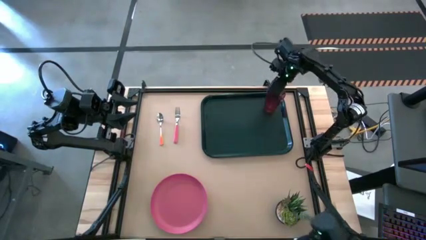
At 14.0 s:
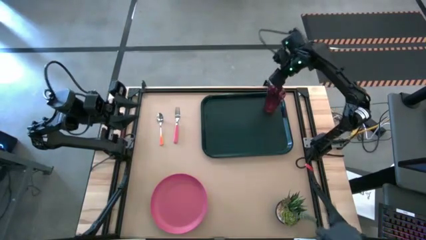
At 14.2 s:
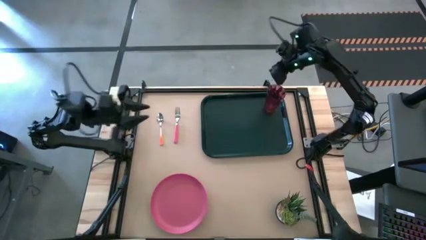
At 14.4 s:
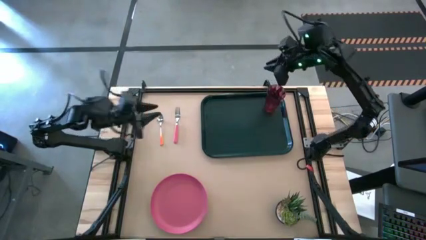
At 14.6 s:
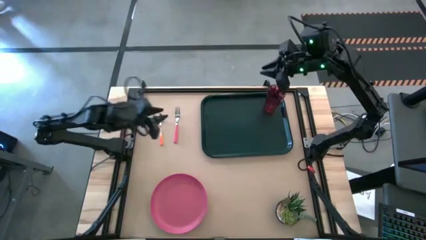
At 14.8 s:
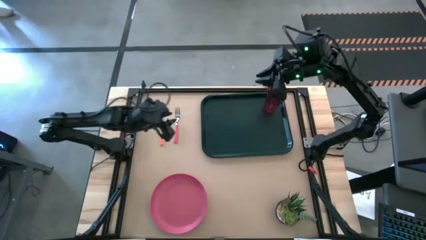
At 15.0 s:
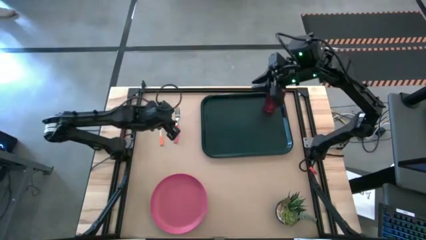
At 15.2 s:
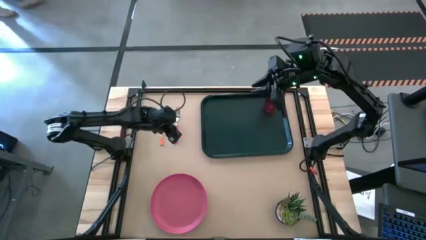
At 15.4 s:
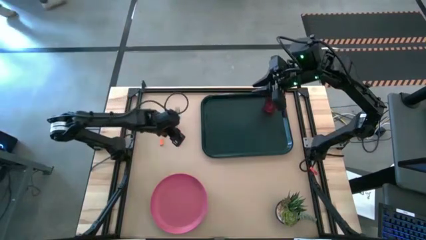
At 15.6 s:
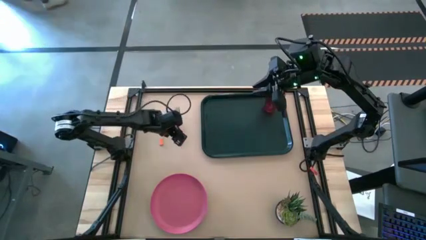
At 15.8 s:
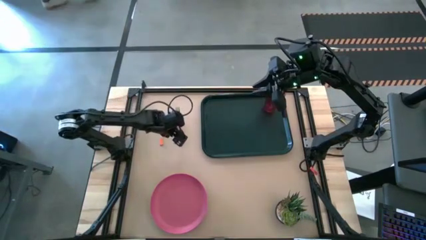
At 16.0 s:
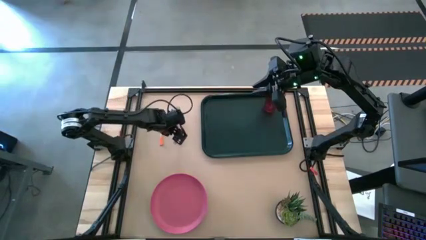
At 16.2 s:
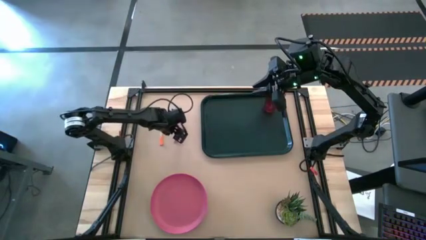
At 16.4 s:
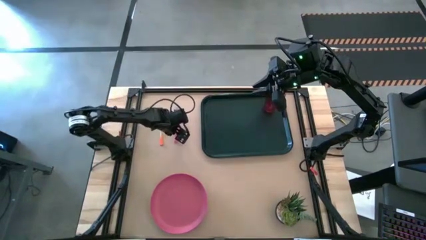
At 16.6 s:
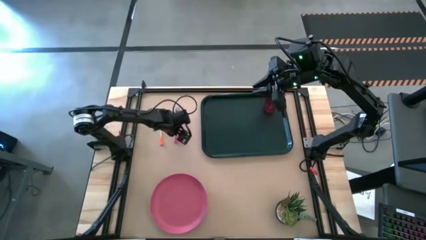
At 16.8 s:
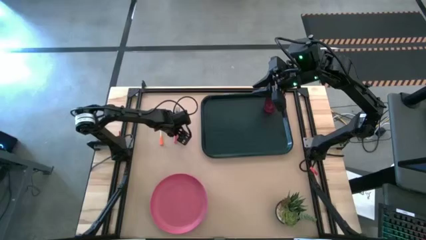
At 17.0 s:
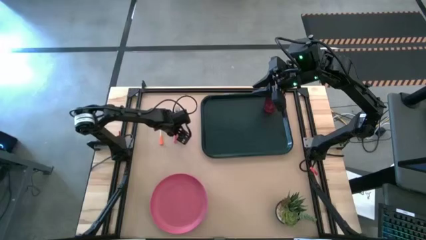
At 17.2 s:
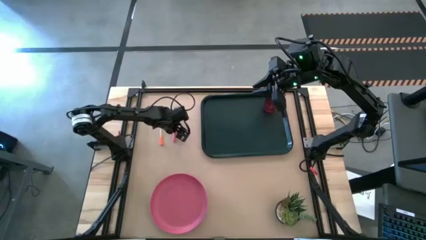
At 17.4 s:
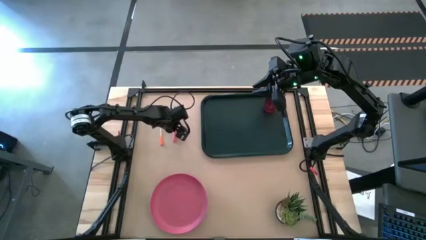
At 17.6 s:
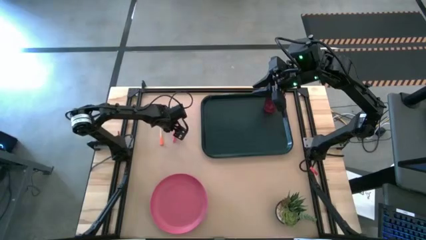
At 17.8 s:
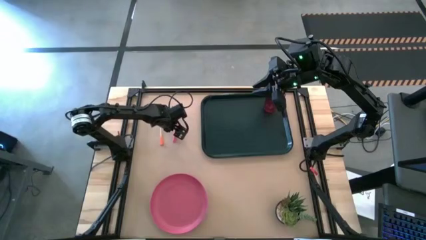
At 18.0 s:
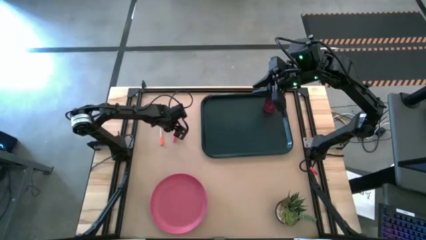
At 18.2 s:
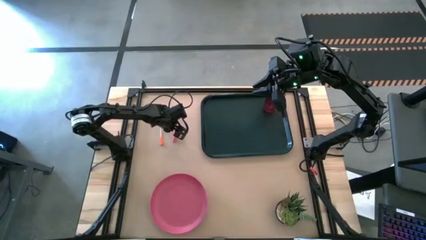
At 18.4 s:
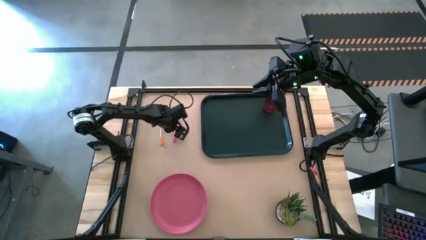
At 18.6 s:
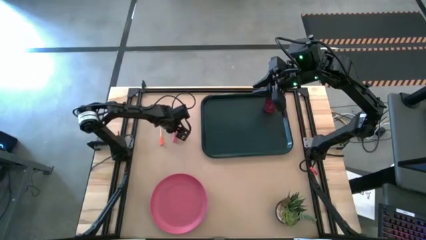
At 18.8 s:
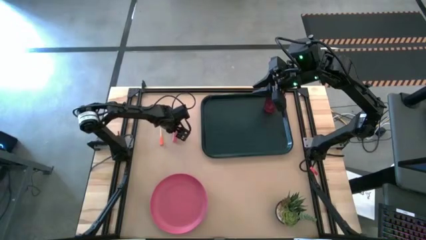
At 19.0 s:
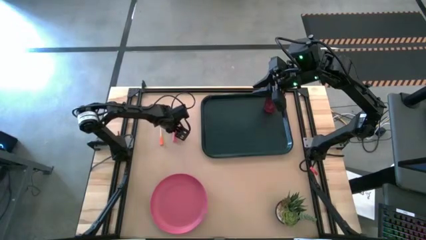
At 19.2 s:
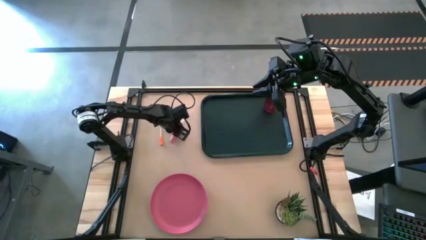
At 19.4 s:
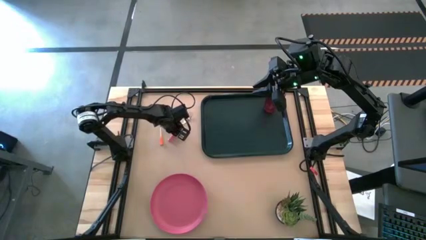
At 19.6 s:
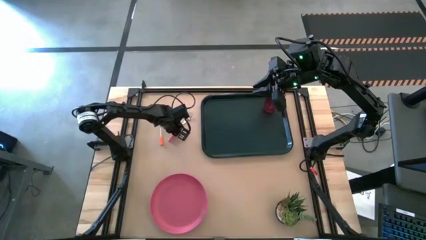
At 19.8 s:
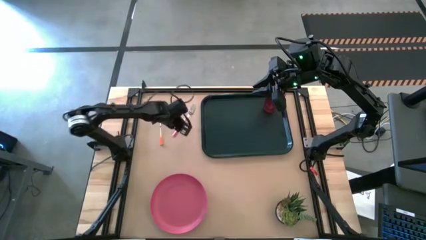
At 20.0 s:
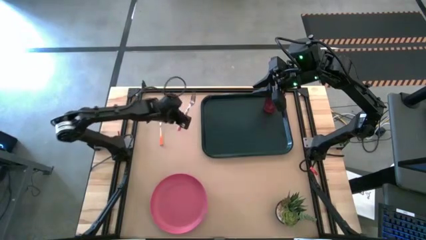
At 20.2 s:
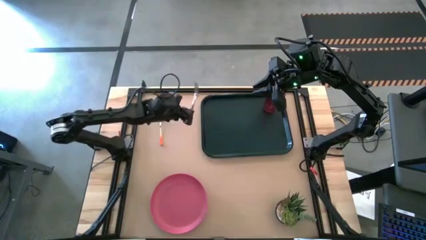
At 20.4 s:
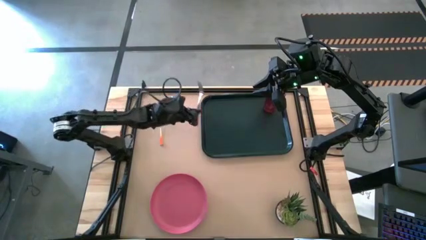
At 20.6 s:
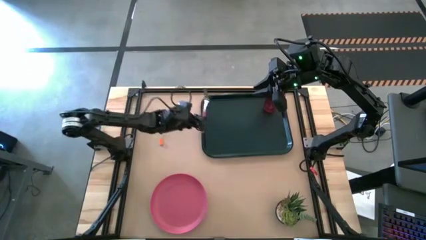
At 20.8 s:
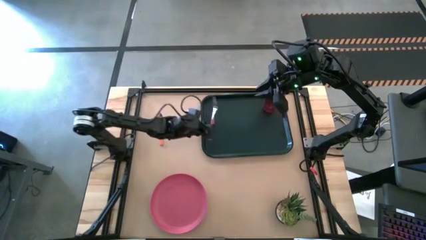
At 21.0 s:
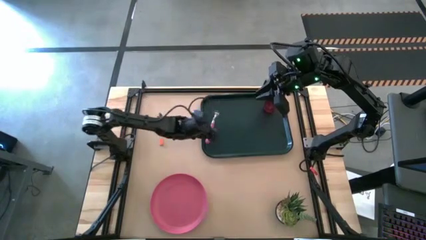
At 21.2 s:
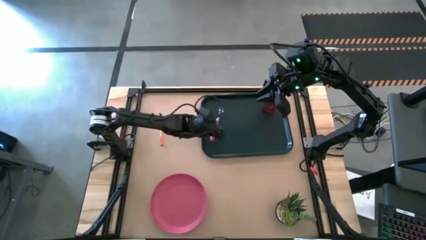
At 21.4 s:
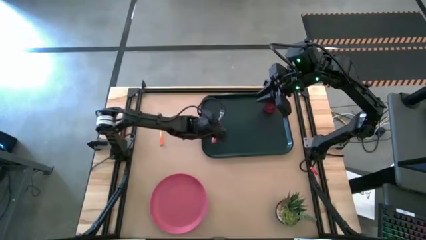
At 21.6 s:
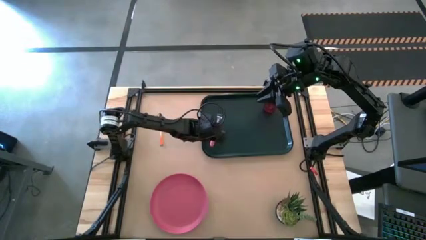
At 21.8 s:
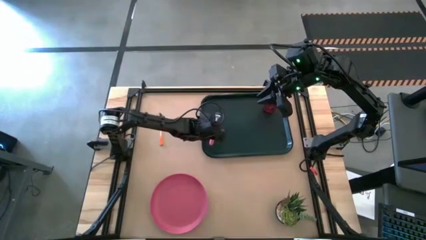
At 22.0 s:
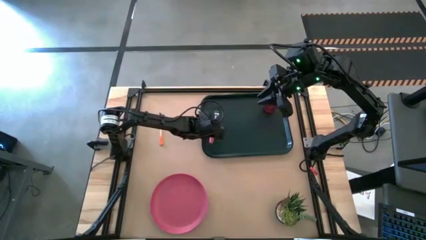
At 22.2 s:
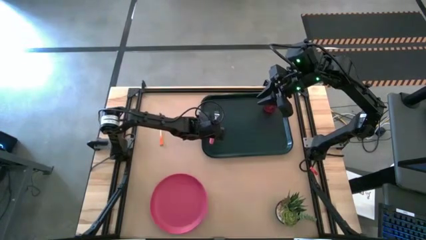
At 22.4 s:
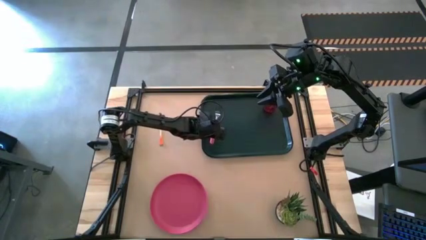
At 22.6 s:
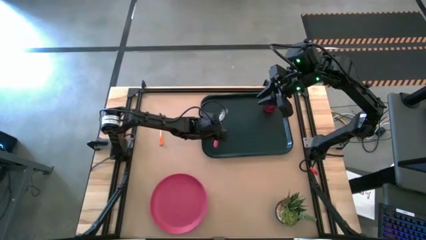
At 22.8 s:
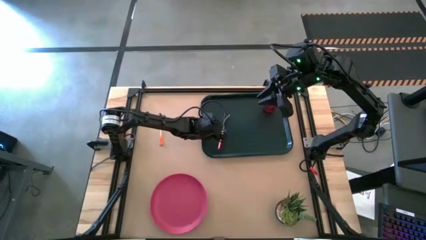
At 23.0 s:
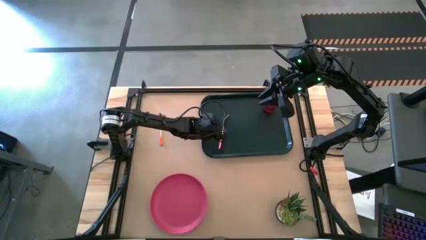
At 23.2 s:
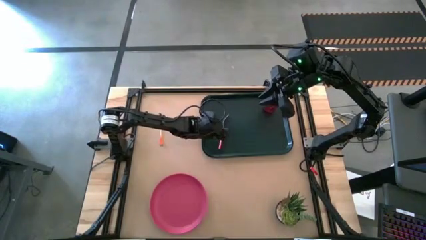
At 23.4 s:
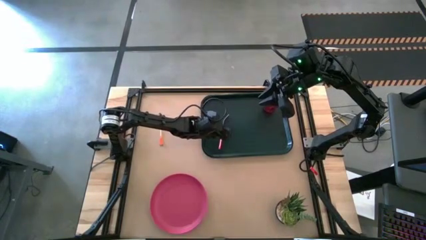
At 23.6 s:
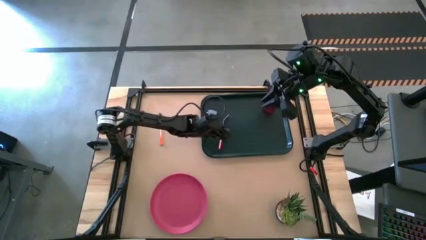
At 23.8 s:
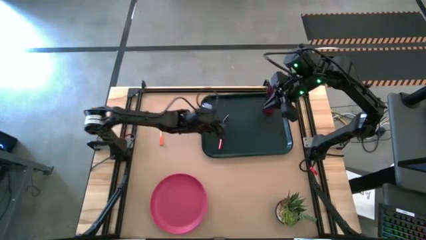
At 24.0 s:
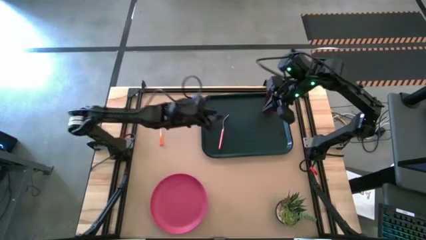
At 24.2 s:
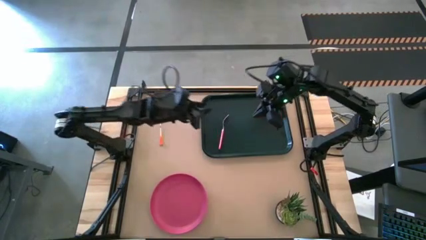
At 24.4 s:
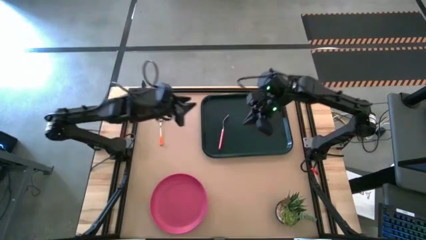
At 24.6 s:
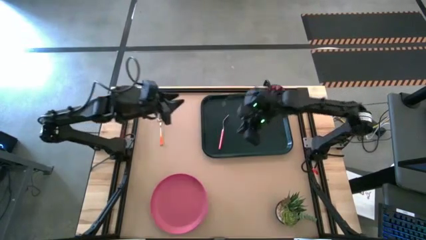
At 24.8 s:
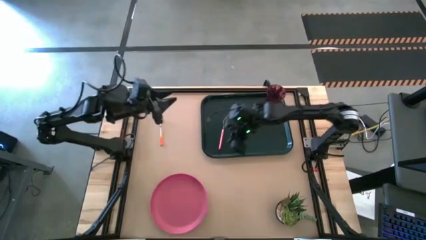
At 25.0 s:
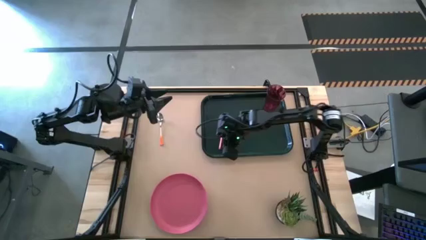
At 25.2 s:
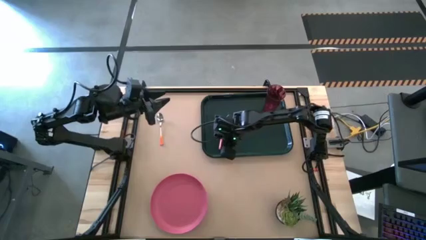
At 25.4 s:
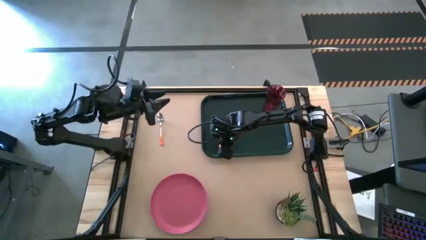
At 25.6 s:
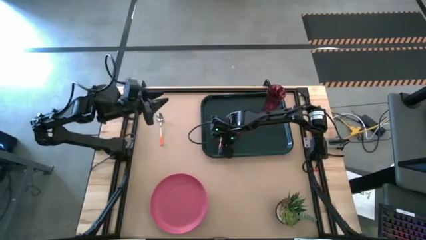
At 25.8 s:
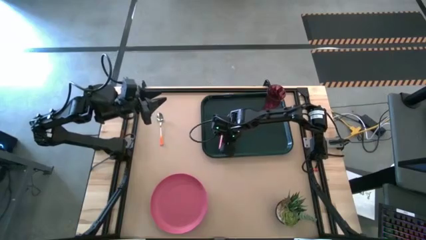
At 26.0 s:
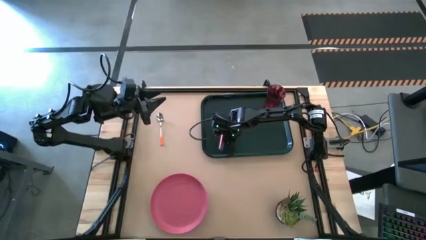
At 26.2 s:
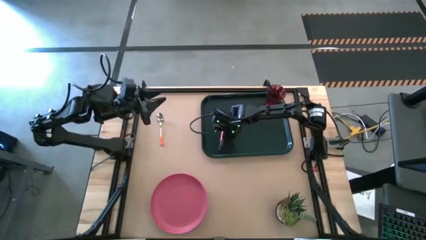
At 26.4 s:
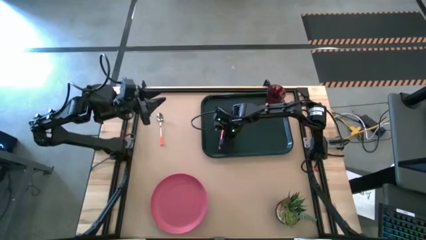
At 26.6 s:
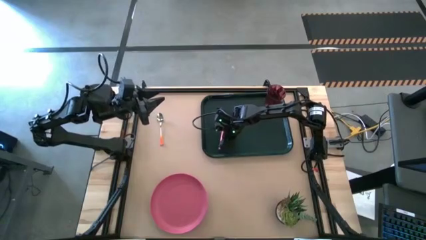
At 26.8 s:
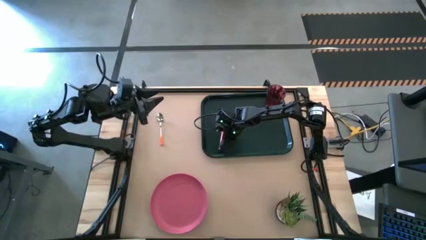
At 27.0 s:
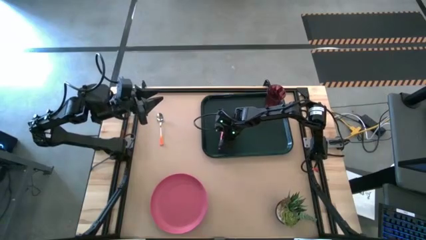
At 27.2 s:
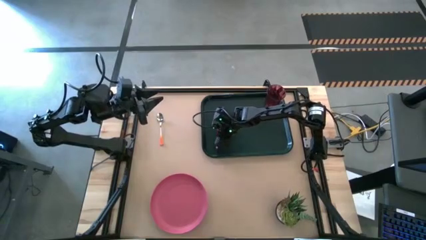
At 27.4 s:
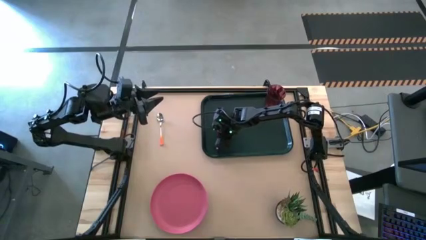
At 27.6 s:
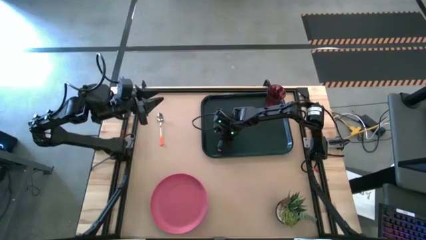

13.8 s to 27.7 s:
Task: Pick and place plate/cup/fork/spoon on tray
Put the pink fork on the black serving tray to the bottom left of the red glass
